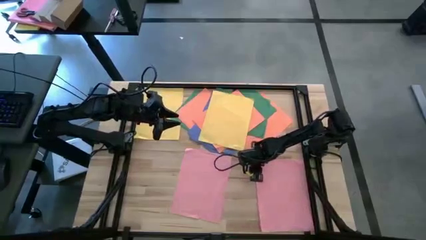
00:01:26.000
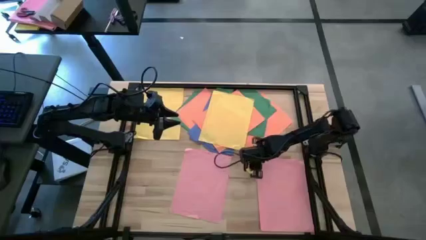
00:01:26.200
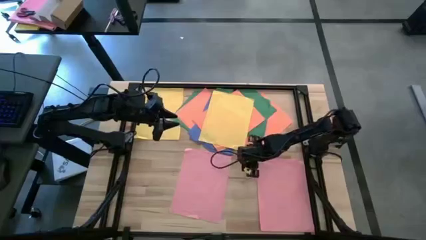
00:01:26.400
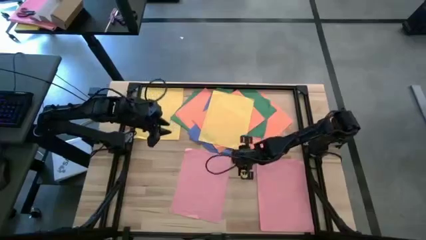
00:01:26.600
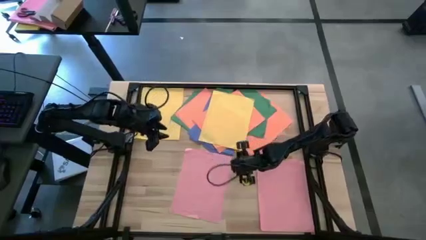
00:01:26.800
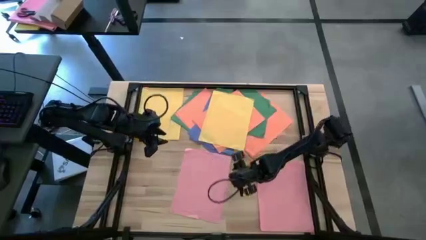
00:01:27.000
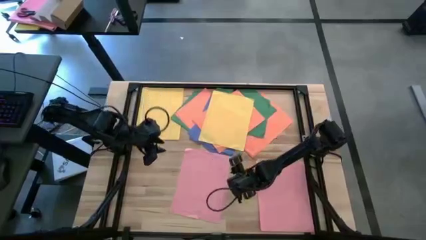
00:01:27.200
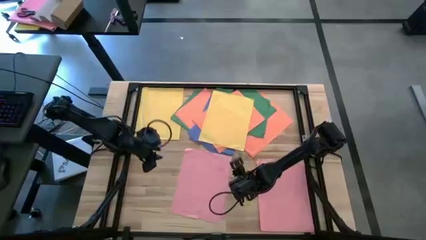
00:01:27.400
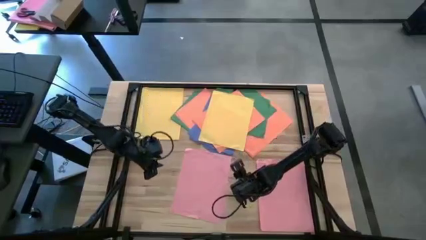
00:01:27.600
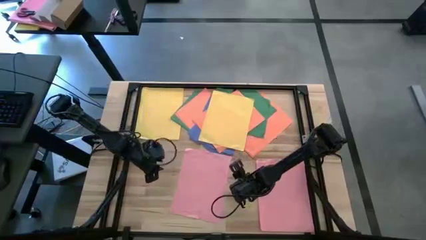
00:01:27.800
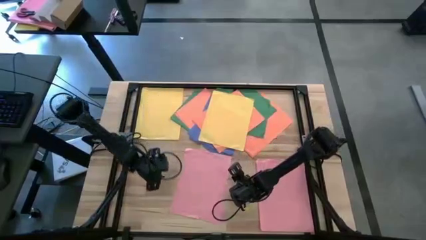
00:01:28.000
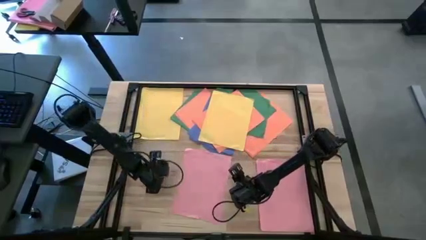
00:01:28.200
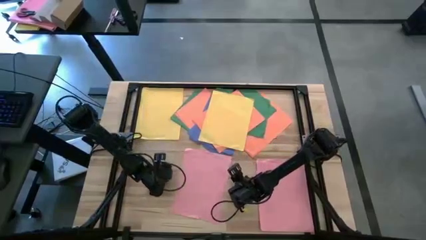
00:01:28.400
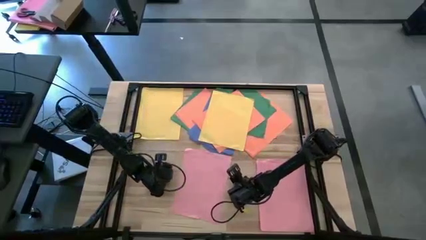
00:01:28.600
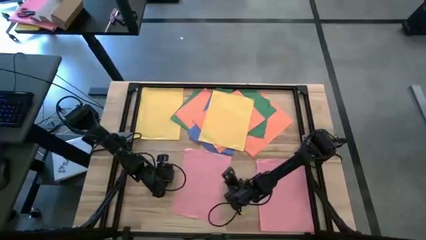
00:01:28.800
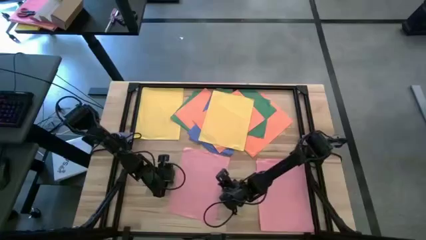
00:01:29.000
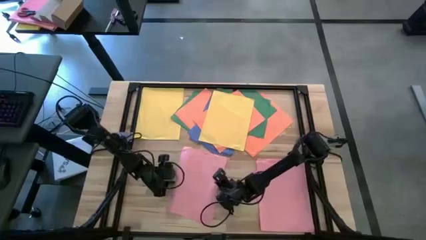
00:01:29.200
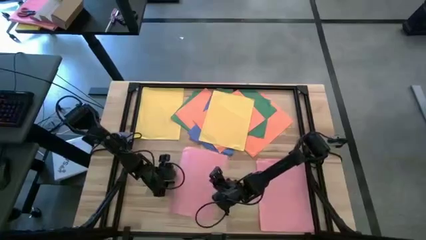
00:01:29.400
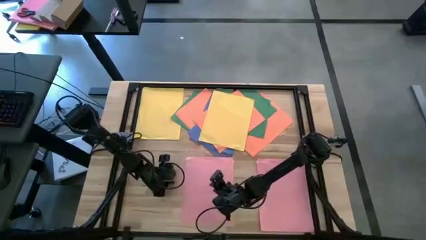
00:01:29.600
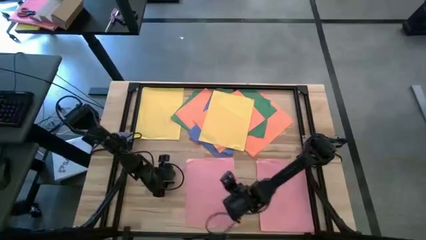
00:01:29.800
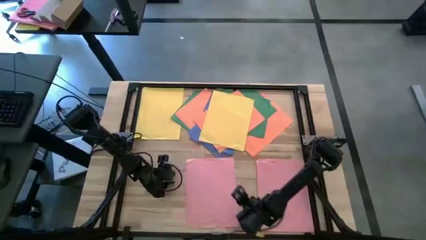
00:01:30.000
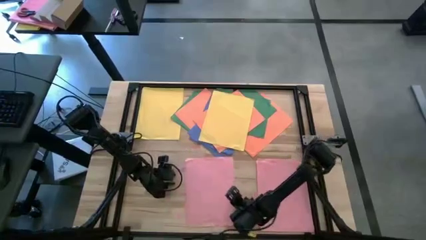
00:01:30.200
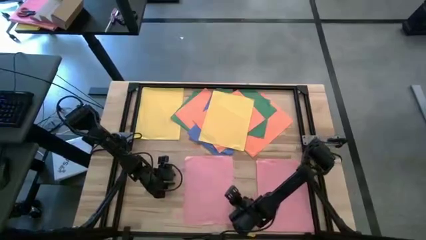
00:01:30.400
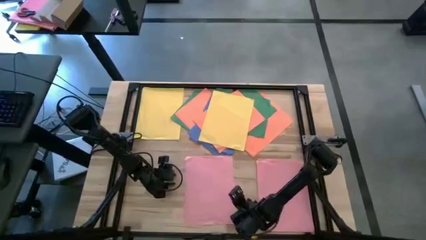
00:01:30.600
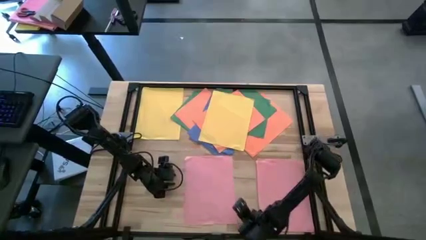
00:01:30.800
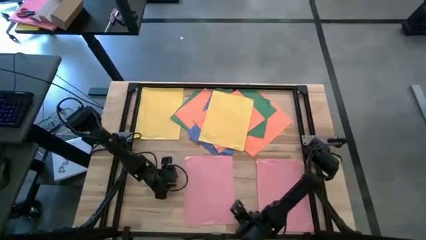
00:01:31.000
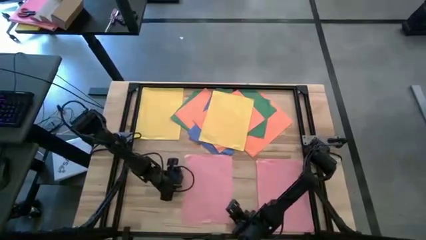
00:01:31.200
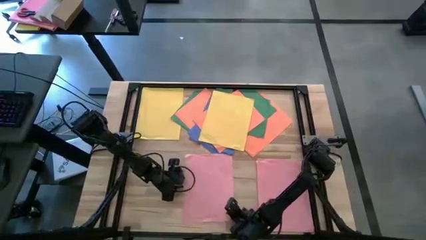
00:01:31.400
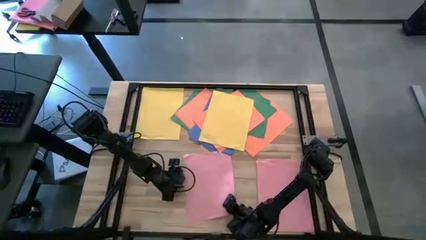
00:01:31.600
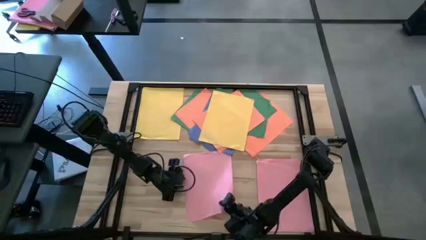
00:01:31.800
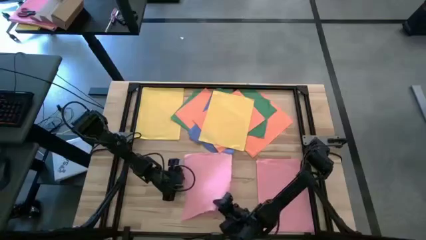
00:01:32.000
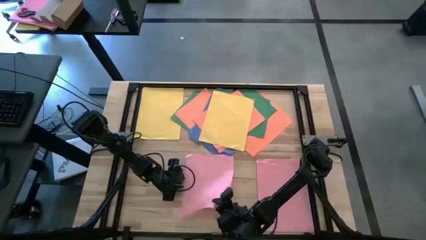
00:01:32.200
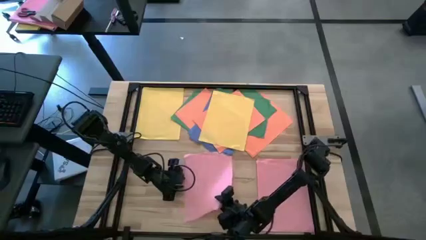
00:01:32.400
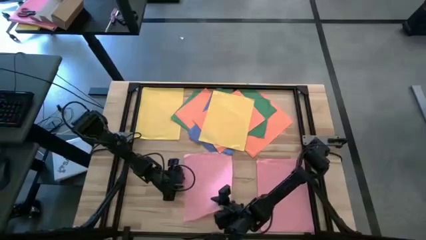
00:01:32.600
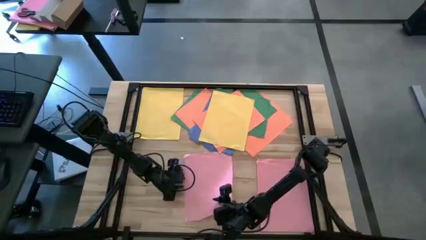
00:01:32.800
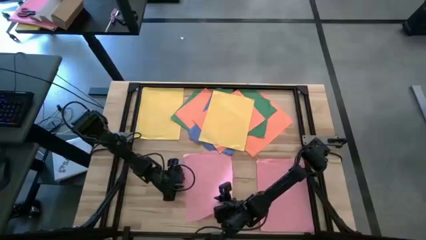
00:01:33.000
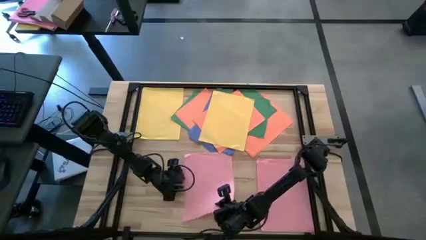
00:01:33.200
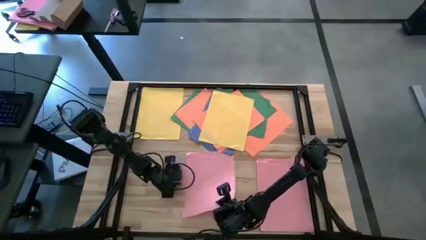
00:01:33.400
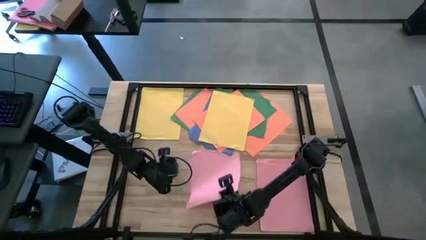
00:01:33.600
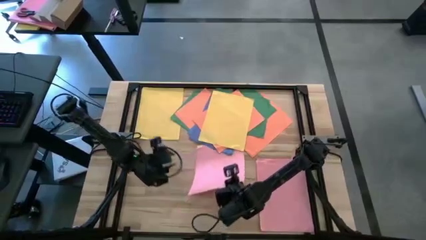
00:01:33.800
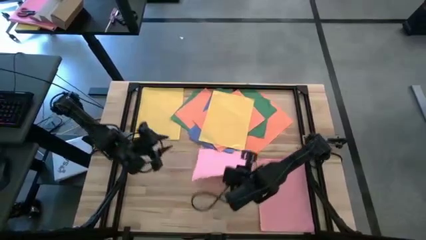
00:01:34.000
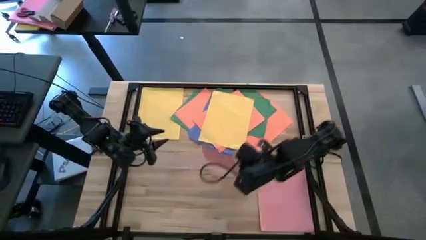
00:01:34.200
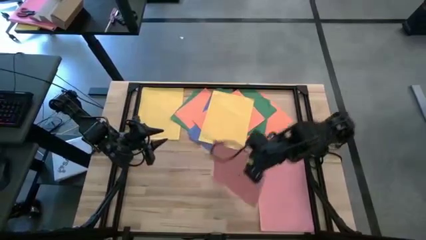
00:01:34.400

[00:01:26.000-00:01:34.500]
Task: Organize paper
Stack the pink paper on top of the stacked pink papers

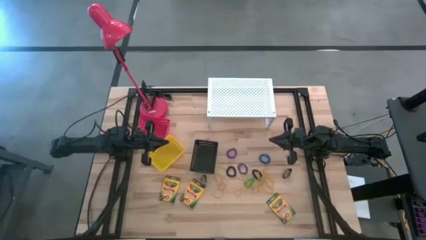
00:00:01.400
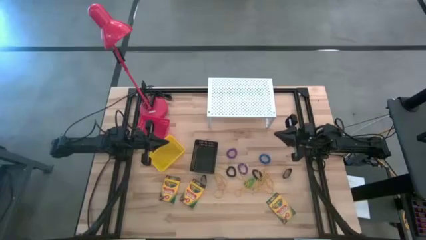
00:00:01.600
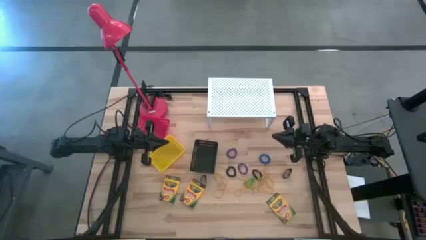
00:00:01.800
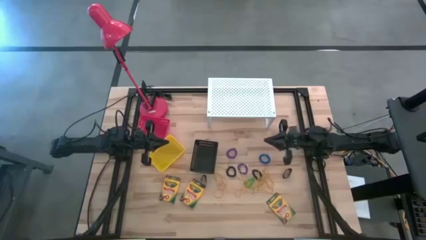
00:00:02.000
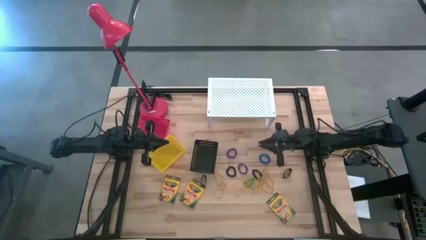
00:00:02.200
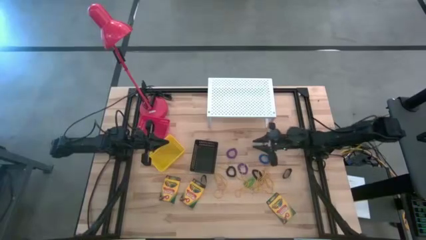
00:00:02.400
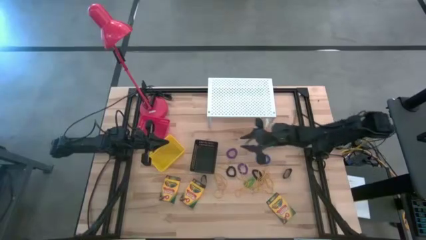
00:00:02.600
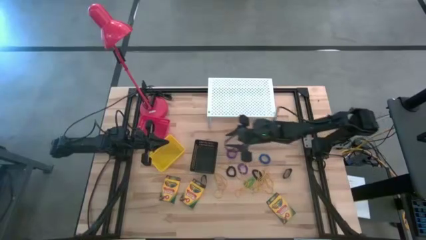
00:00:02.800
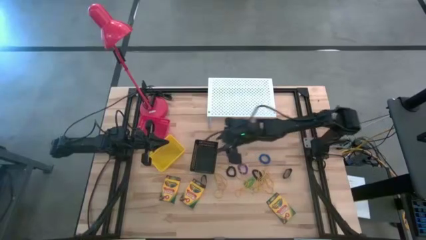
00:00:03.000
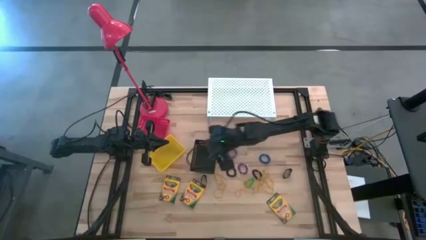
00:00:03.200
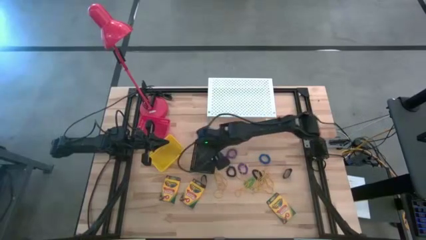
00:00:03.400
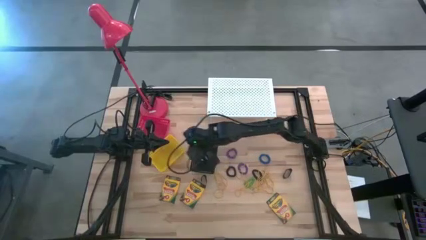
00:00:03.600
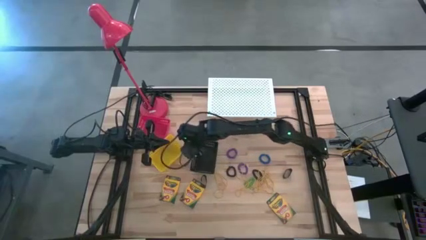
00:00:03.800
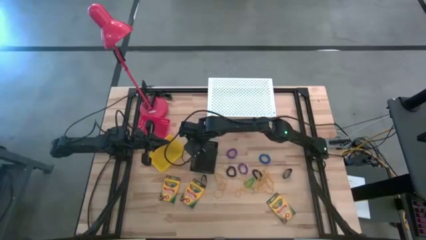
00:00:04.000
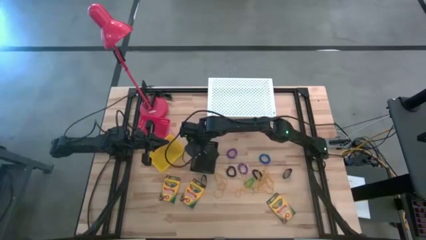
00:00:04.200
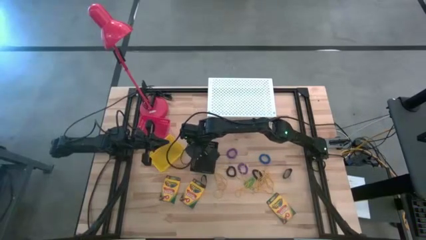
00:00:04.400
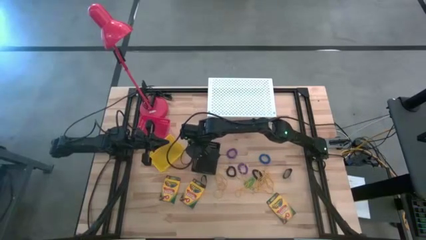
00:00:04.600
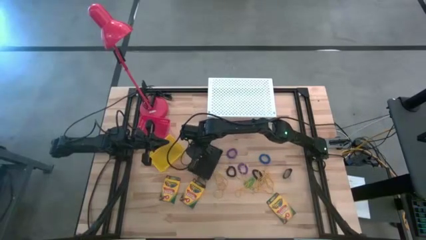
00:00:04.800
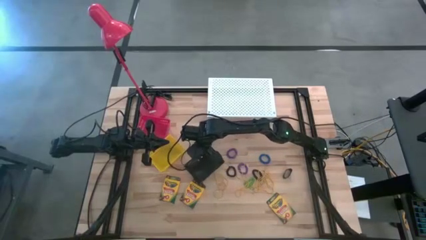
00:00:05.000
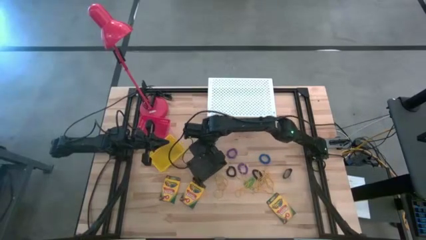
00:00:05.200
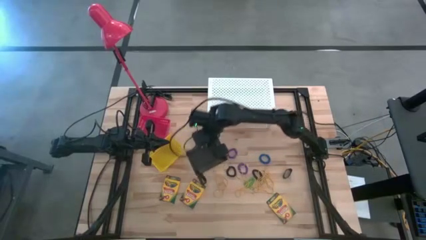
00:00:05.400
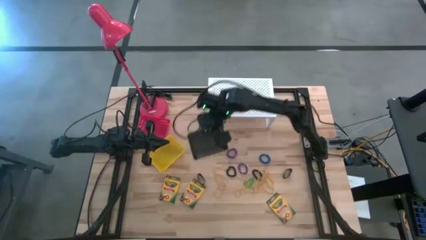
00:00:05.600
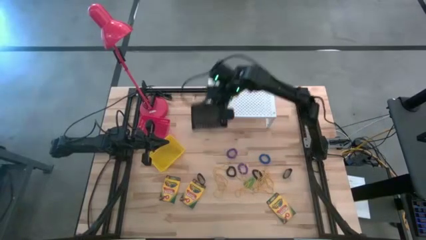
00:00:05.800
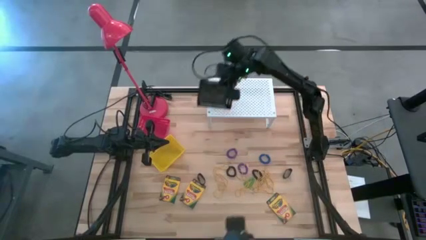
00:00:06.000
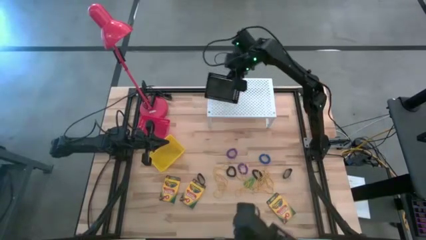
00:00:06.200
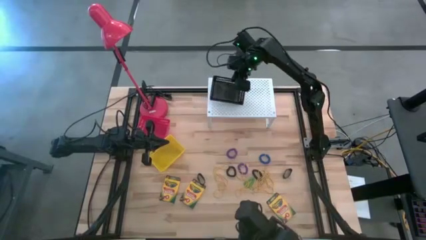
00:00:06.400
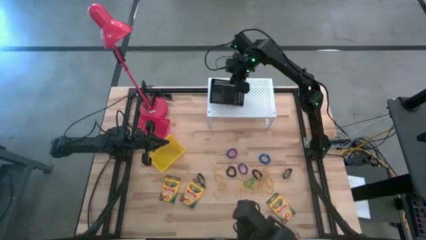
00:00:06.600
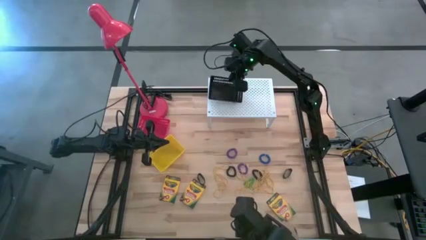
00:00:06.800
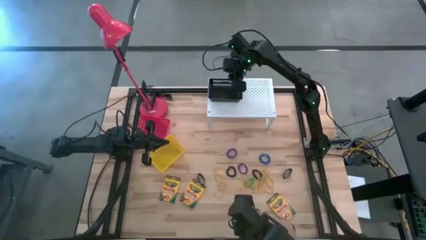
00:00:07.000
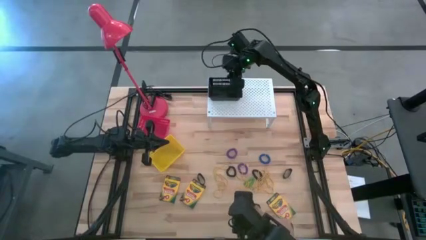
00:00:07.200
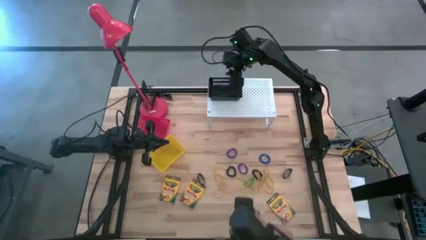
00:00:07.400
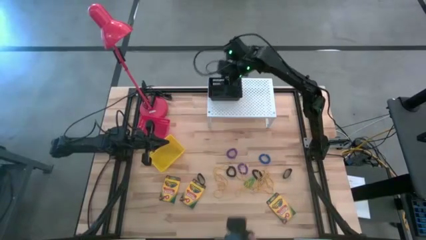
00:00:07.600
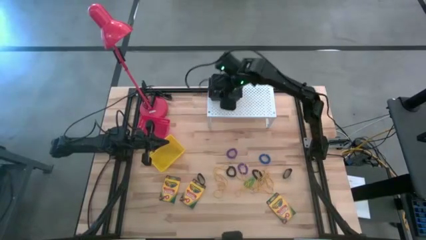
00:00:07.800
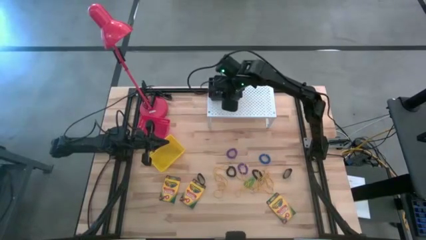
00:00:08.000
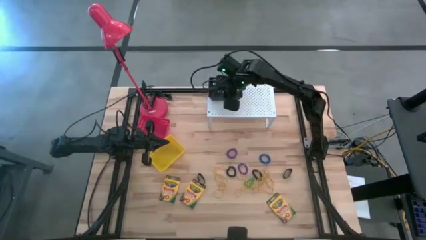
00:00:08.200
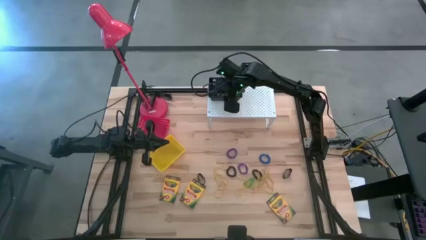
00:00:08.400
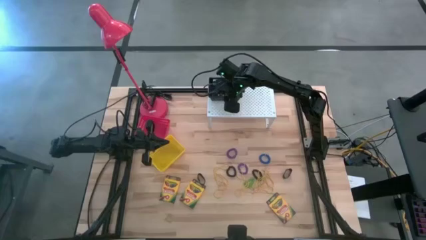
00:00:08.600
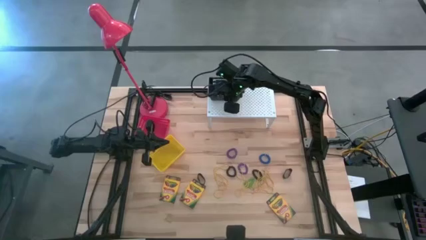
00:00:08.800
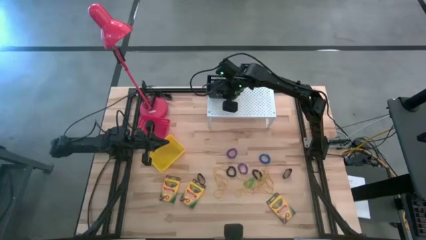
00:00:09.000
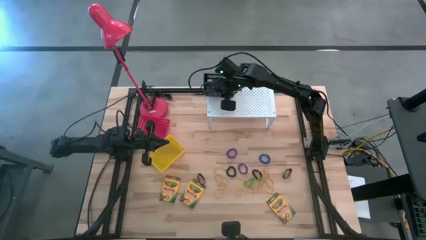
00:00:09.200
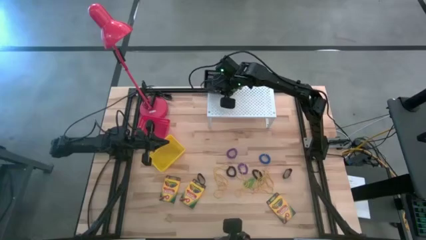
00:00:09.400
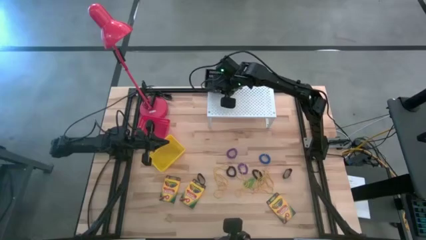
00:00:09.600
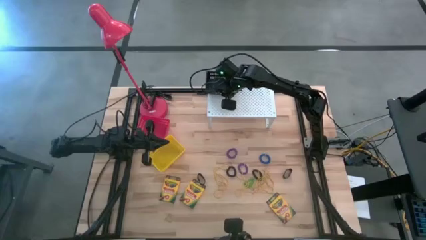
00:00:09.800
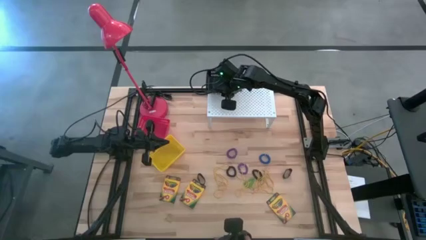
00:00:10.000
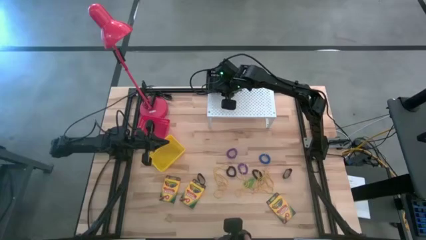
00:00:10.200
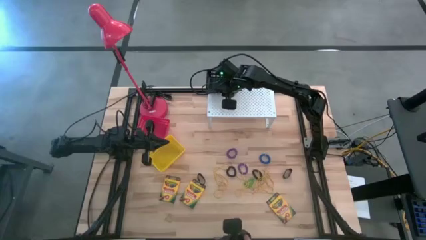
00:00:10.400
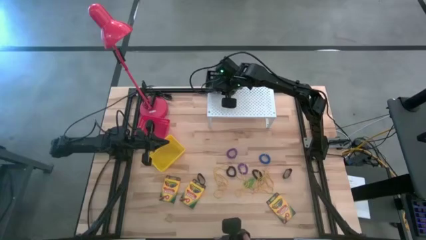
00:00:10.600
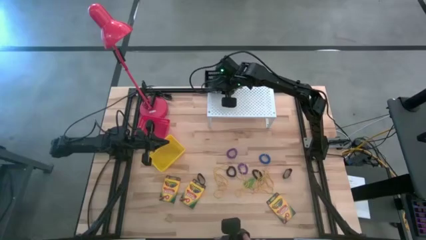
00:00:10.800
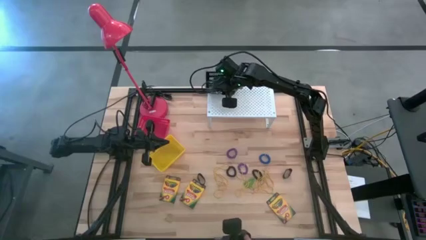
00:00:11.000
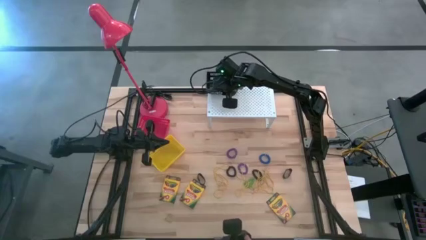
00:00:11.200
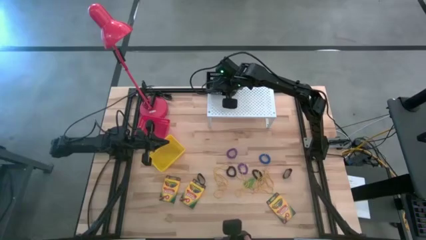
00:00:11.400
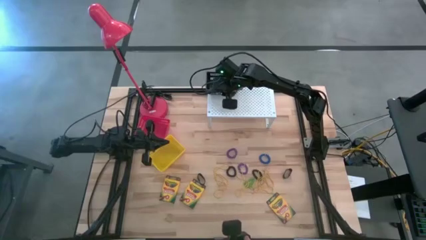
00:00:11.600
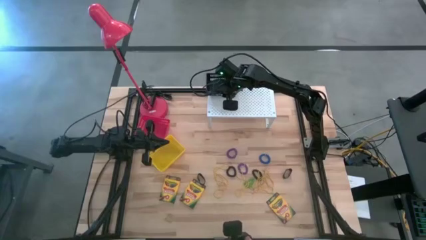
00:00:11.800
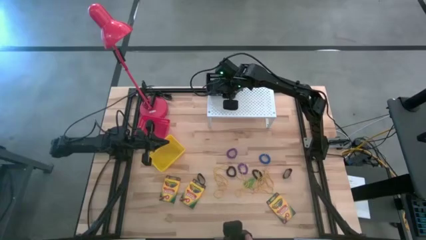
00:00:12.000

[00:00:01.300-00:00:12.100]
Task: Pick & Place Office Desk Supplies
Put the black bin on the shelf
